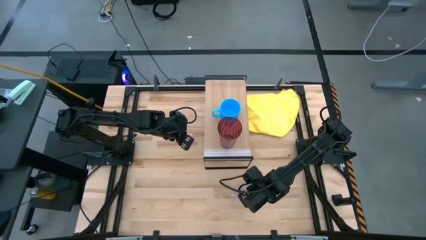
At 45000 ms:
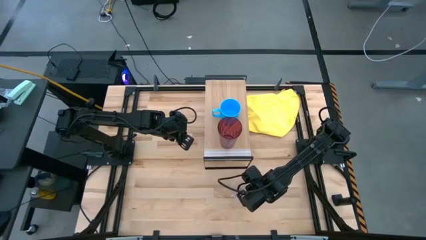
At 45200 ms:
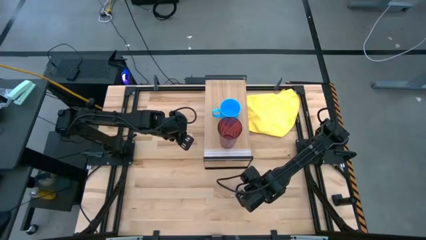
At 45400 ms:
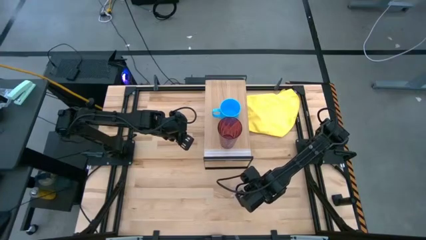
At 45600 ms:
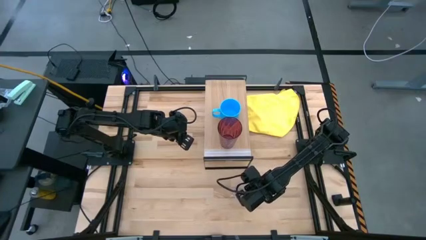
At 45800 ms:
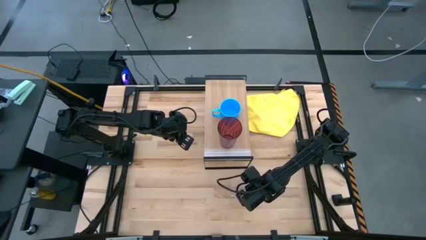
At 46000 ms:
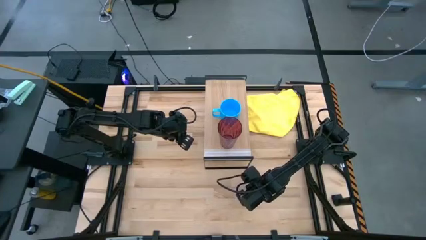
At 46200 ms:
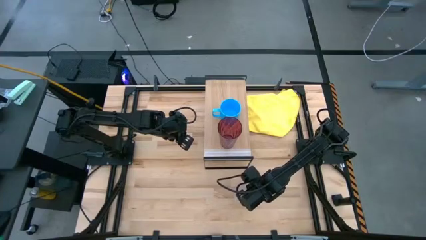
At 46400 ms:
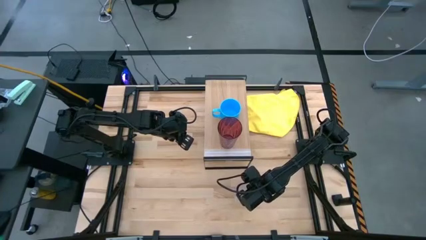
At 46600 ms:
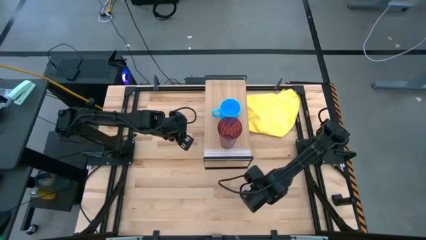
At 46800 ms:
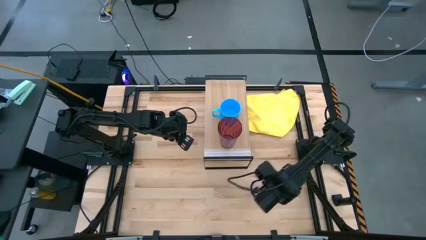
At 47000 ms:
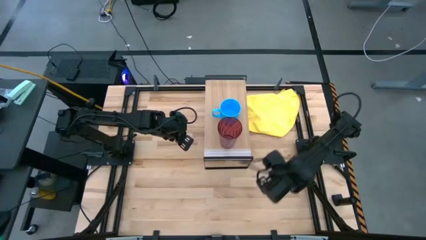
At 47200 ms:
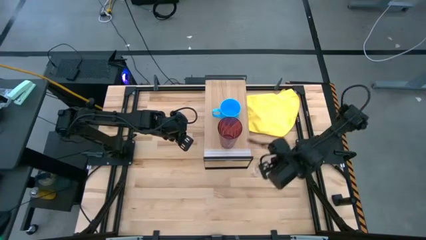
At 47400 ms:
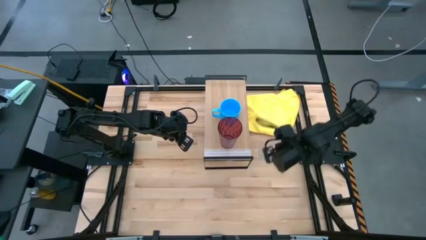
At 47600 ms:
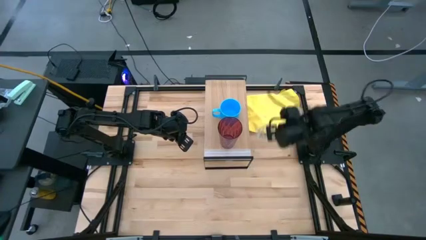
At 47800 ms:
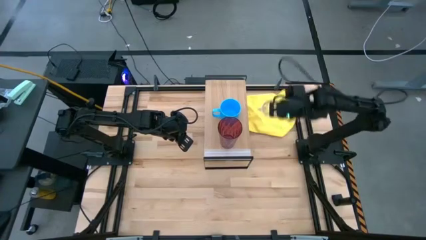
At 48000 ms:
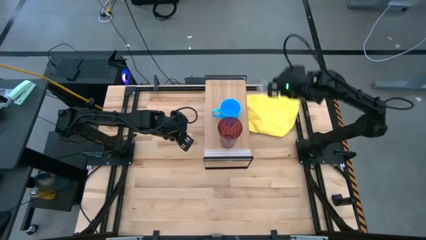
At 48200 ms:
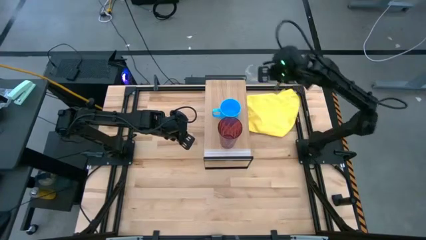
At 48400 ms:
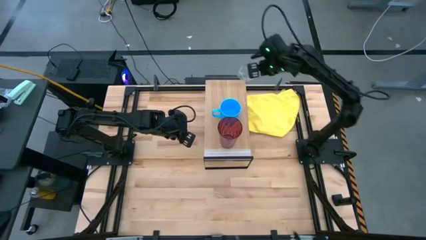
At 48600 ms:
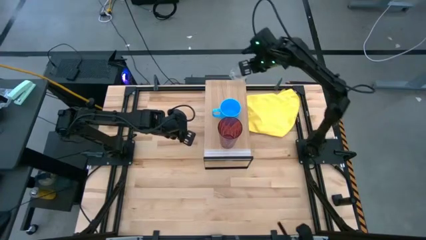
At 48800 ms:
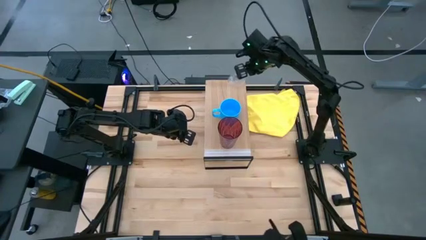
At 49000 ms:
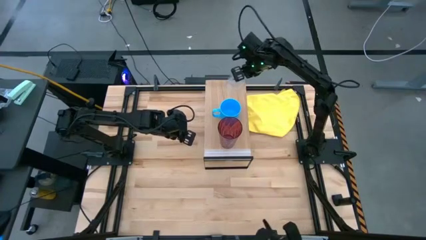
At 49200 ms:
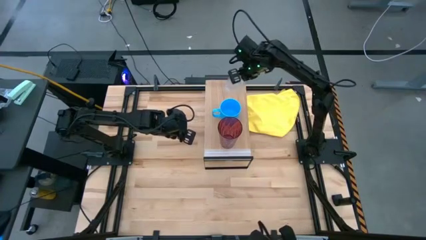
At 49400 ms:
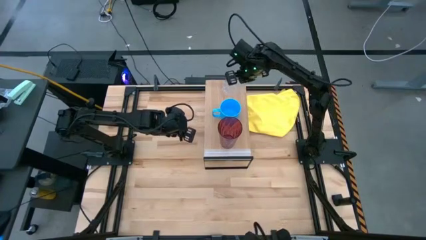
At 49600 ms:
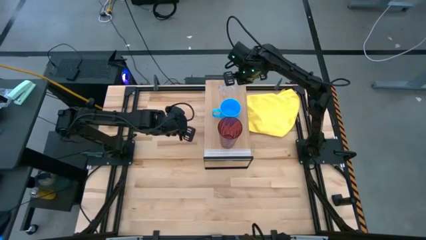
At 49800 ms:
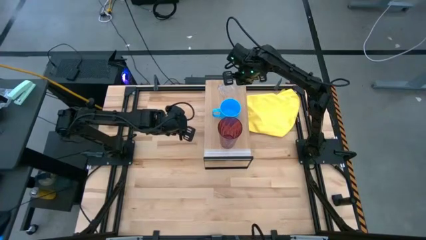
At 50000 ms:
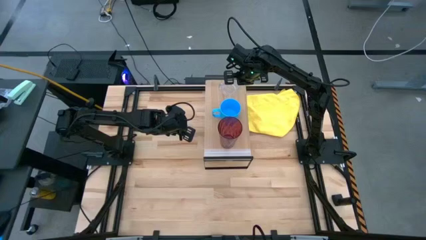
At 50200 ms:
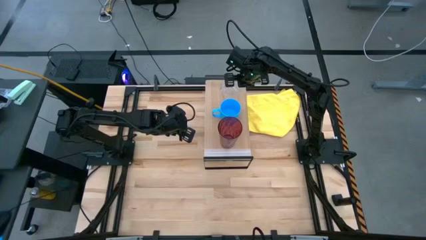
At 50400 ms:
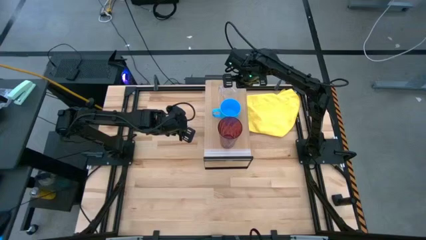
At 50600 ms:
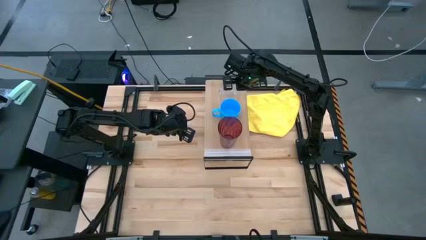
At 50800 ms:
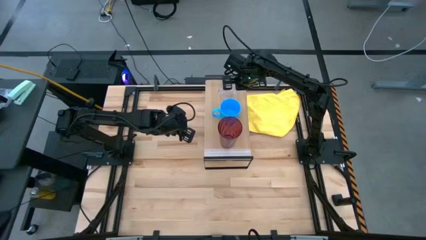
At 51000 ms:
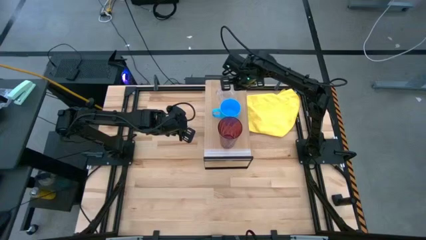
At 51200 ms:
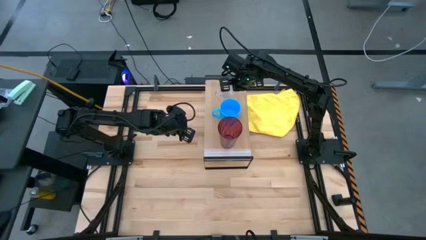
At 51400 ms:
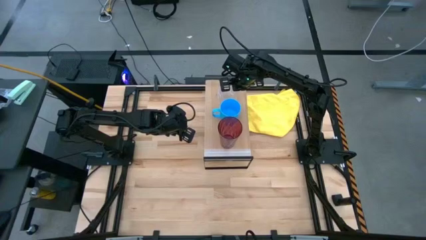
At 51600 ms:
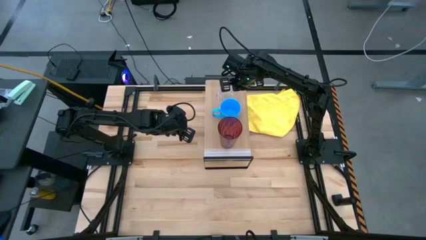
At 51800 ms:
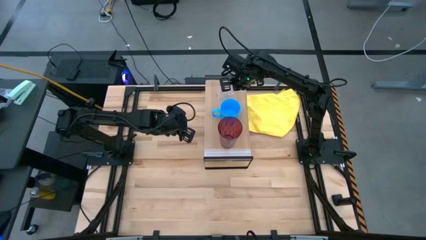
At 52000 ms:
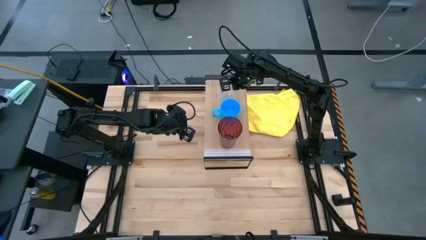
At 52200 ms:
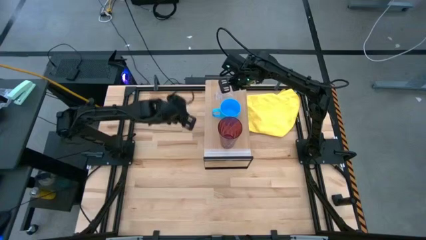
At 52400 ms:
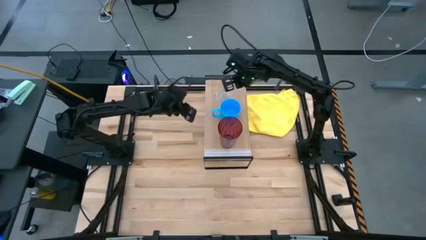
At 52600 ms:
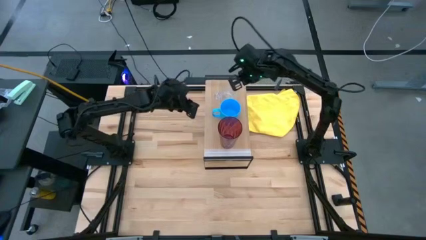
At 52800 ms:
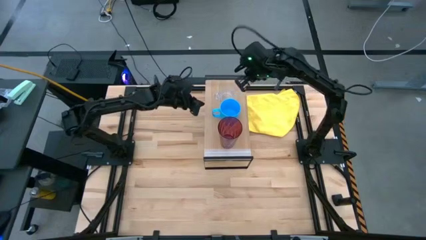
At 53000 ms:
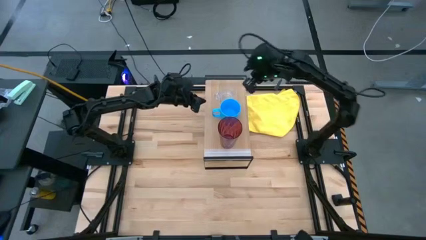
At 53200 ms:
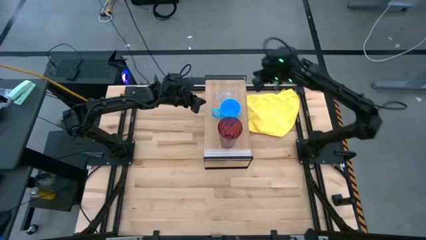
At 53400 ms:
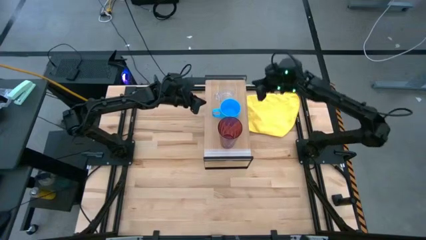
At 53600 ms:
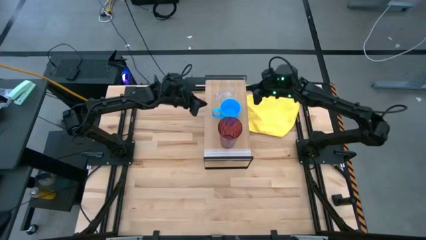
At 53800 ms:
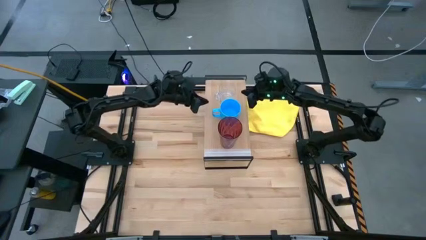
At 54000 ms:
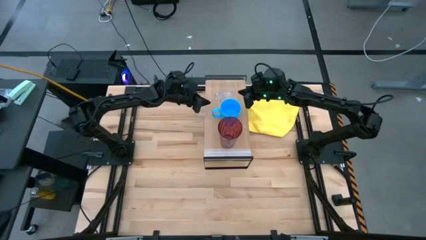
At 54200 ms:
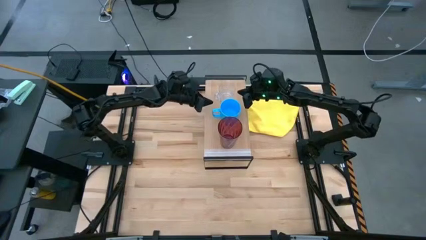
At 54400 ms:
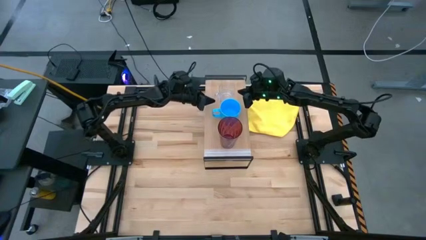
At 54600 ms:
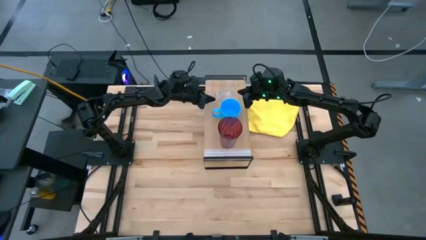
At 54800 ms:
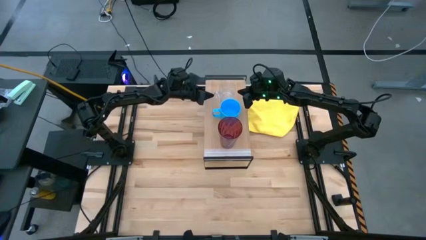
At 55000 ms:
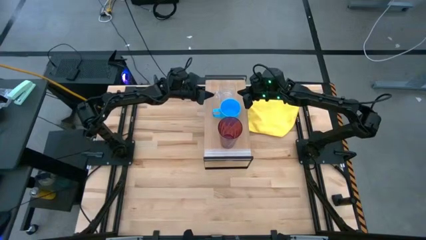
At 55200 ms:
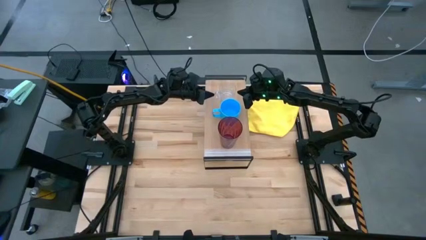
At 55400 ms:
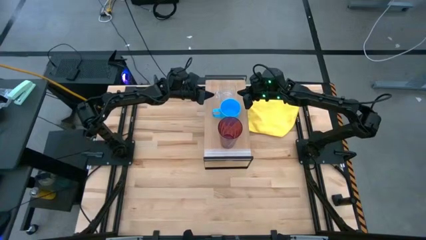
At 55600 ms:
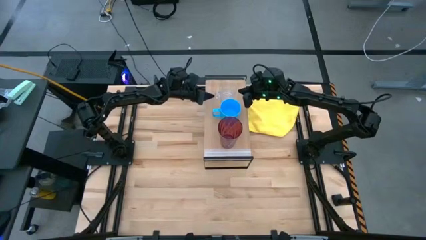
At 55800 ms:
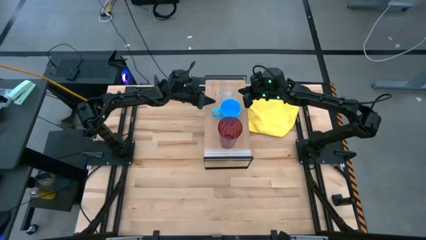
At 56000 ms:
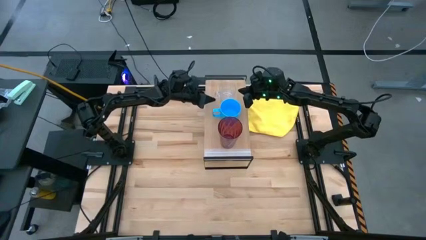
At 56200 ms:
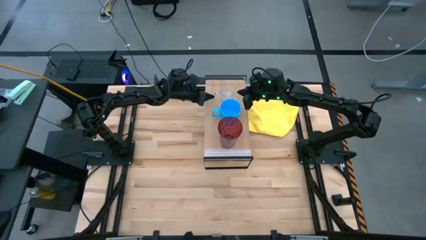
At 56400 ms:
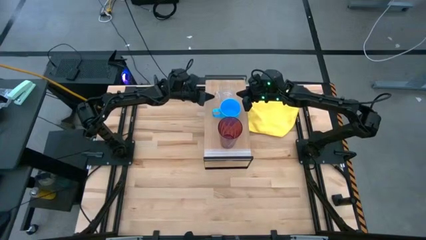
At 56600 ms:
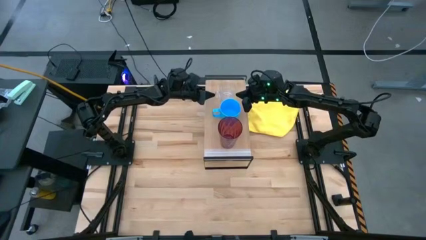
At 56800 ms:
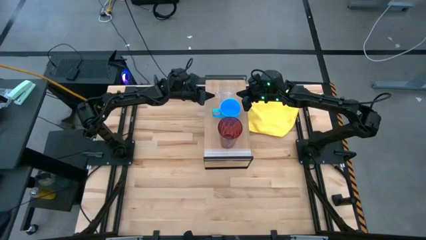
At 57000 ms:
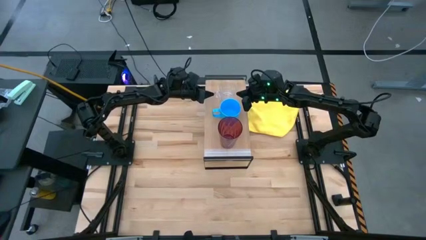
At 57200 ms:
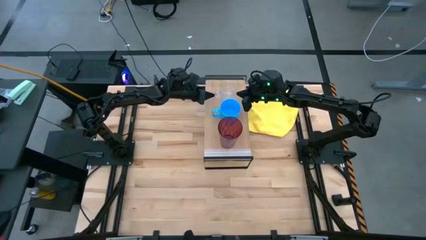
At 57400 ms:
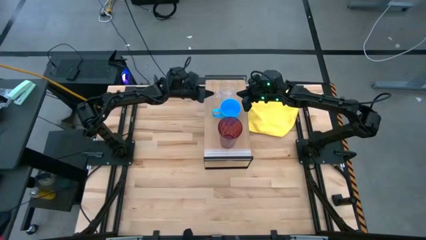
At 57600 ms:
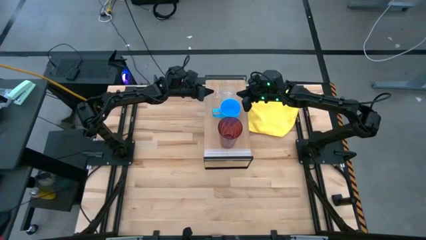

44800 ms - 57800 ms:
Task: Stack small to large cups/mugs on shelf
Put the transparent mug on the shelf

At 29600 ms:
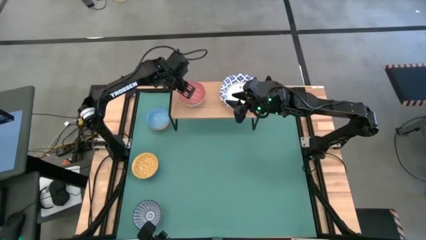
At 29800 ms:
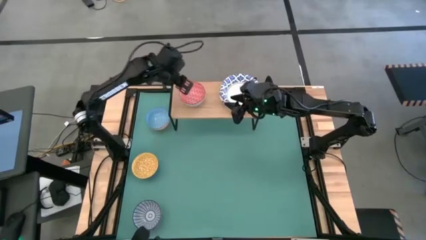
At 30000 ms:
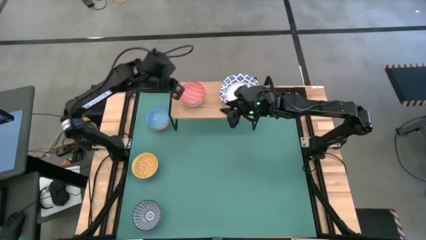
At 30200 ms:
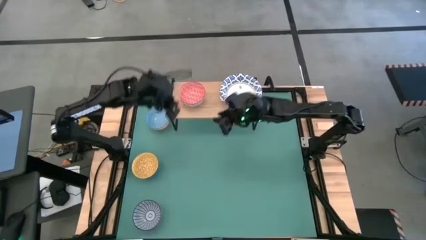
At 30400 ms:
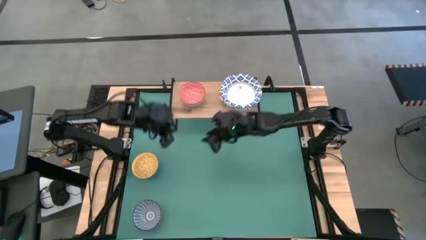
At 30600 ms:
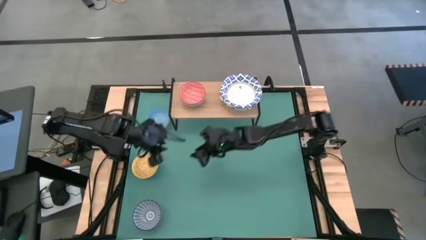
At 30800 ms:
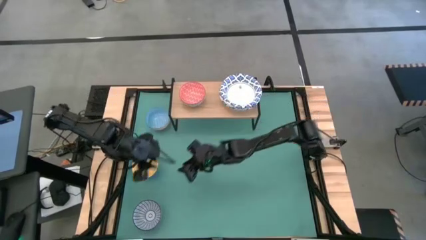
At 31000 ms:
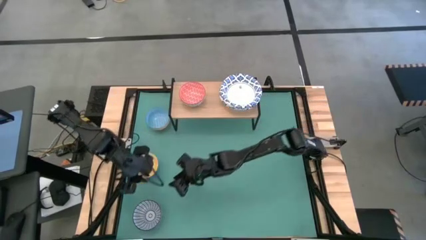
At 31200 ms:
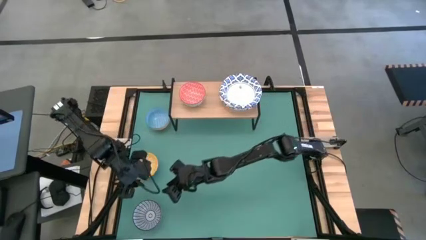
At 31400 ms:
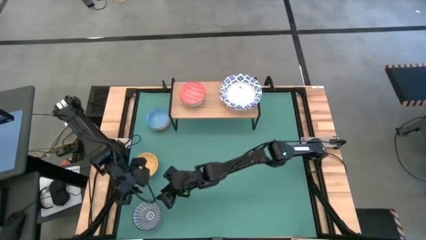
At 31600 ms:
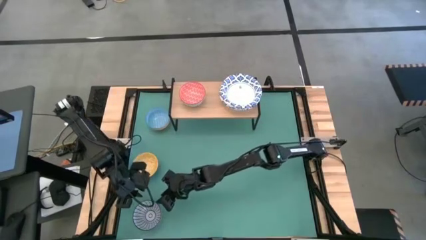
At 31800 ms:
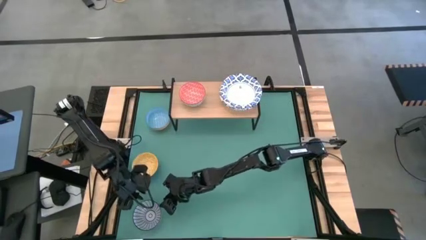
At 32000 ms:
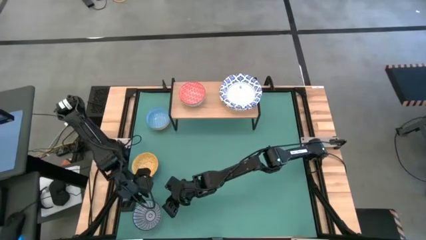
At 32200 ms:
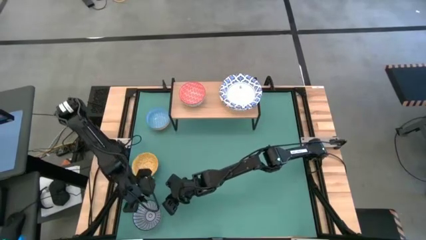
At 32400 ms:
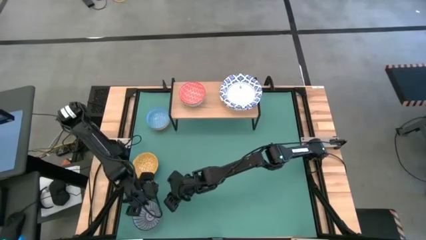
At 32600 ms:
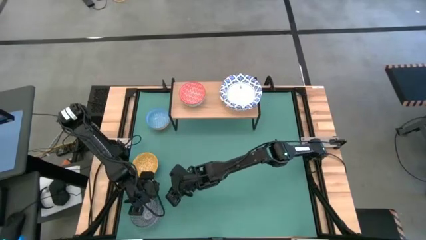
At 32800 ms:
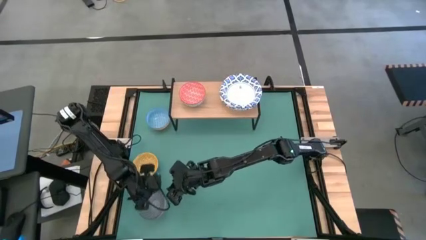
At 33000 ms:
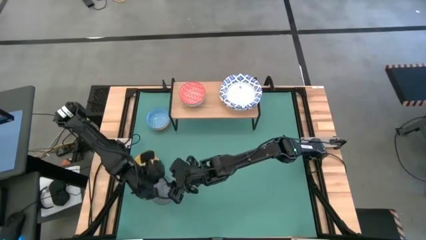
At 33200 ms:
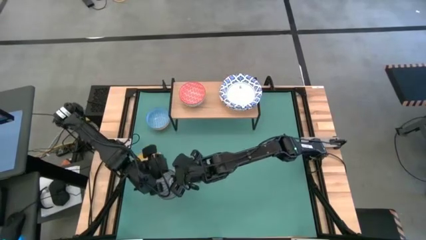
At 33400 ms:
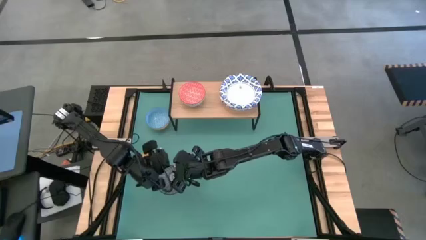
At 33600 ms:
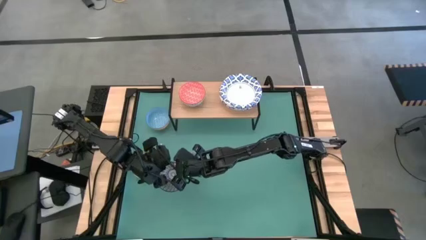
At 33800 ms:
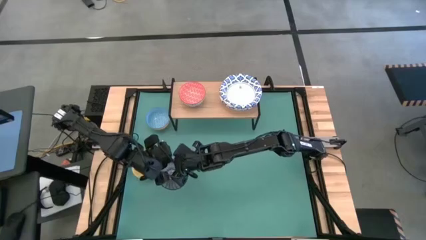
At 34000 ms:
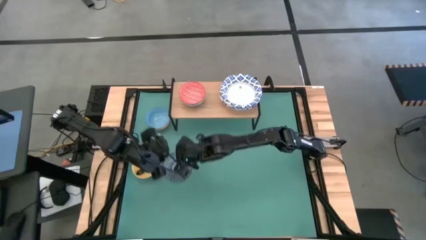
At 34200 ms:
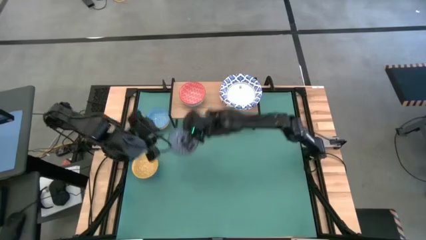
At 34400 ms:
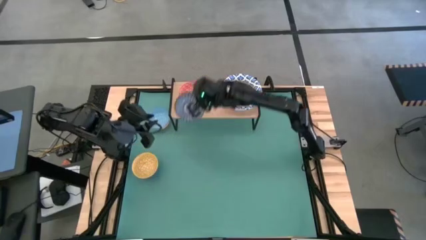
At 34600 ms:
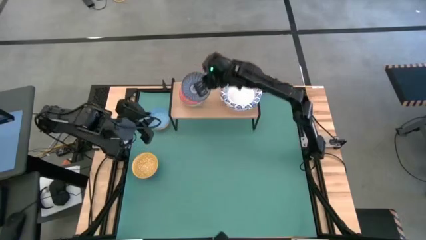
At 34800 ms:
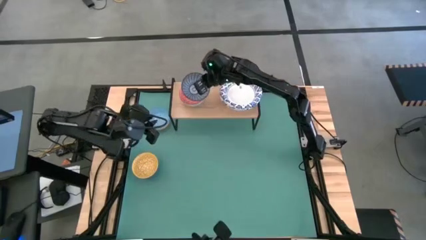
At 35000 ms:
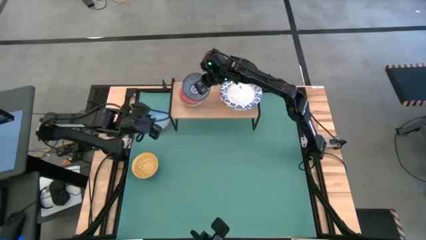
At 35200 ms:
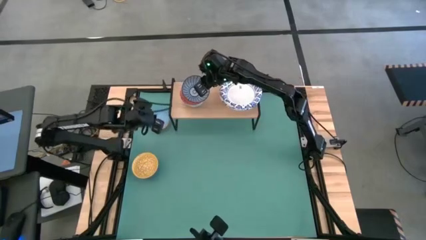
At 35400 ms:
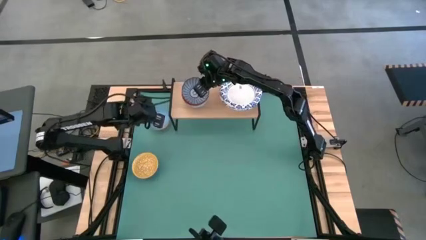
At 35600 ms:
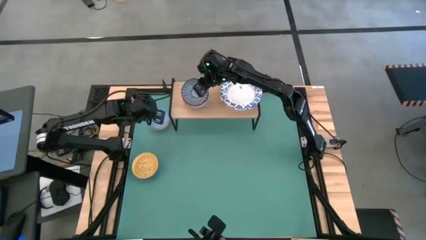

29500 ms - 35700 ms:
Task: Place and stack bowls onto a shelf
Stack the blue patterned bowl on top of the red patterned bowl on the shelf
